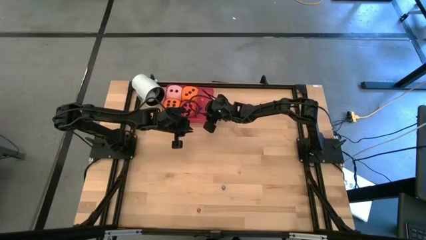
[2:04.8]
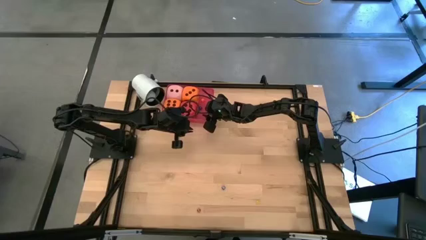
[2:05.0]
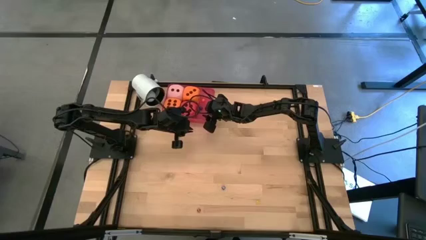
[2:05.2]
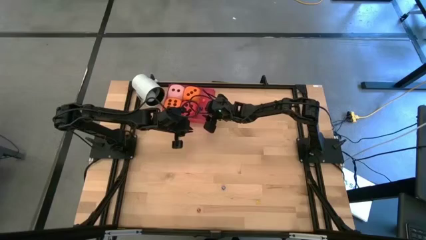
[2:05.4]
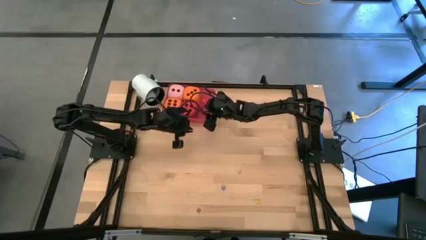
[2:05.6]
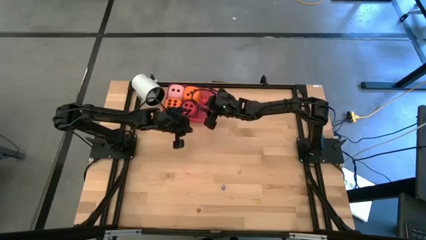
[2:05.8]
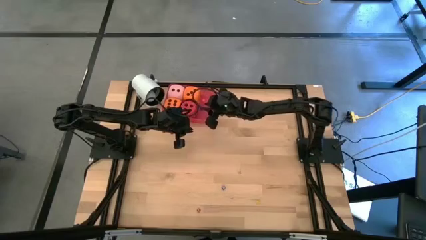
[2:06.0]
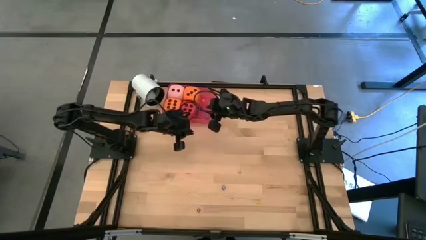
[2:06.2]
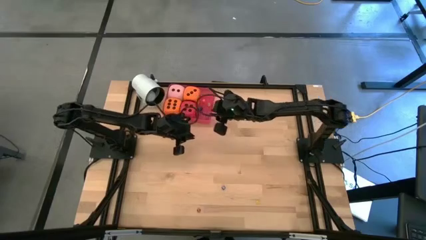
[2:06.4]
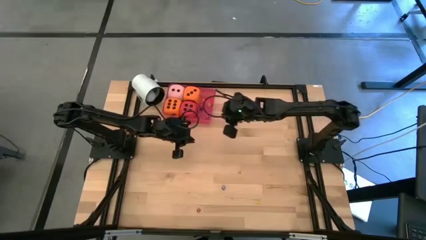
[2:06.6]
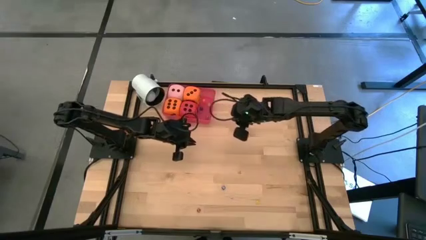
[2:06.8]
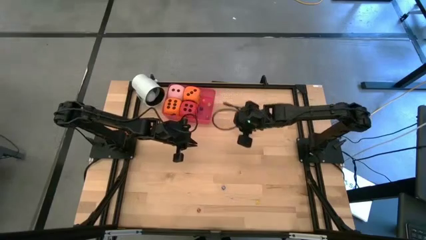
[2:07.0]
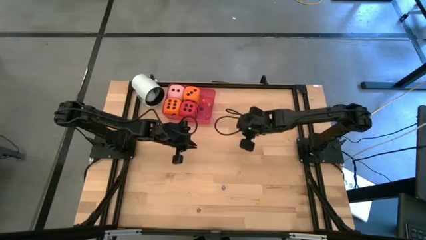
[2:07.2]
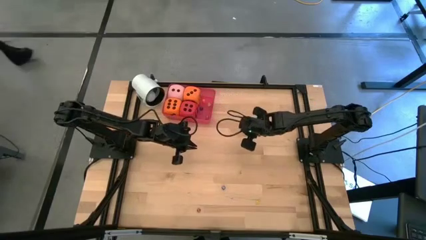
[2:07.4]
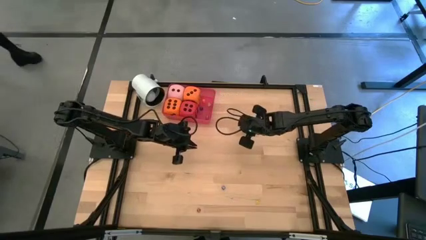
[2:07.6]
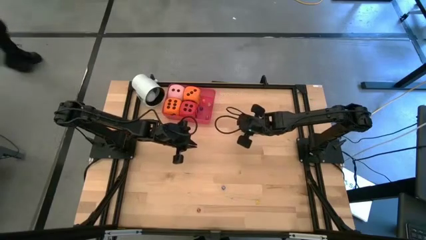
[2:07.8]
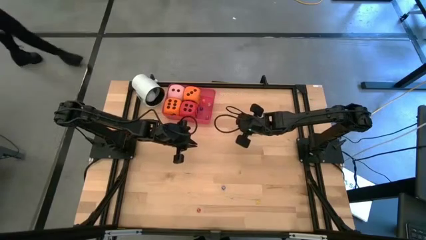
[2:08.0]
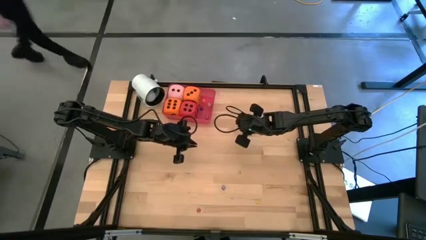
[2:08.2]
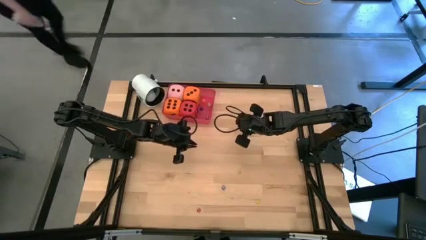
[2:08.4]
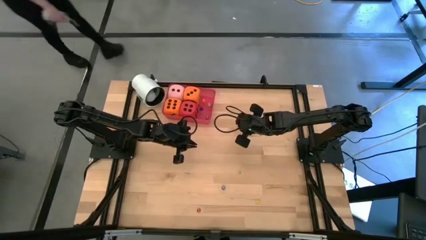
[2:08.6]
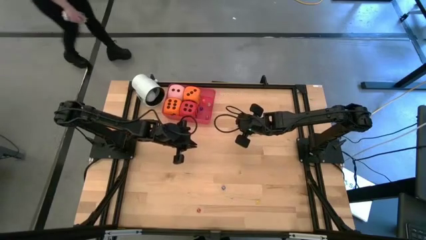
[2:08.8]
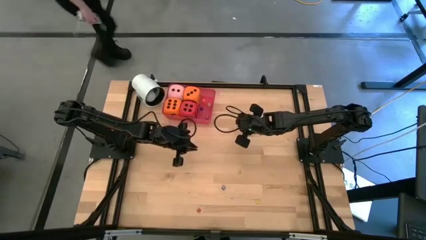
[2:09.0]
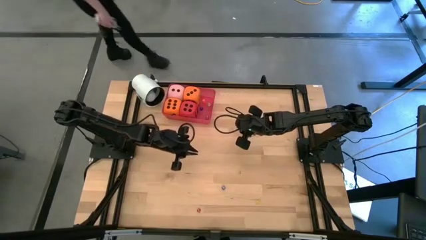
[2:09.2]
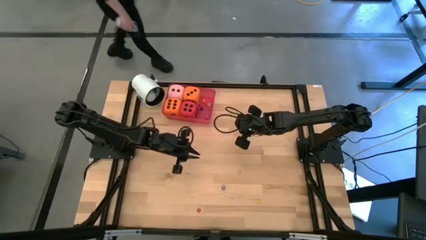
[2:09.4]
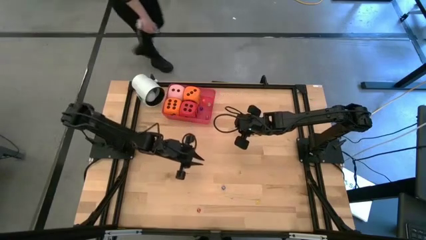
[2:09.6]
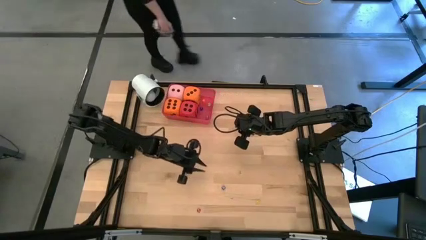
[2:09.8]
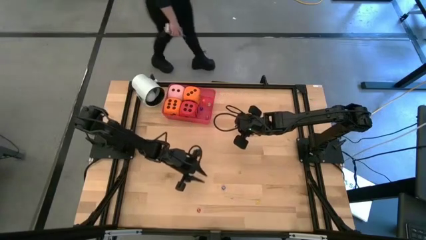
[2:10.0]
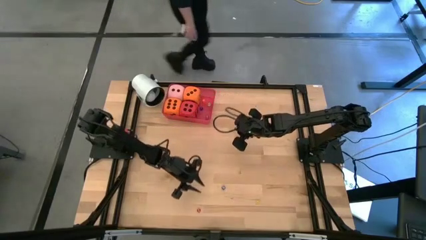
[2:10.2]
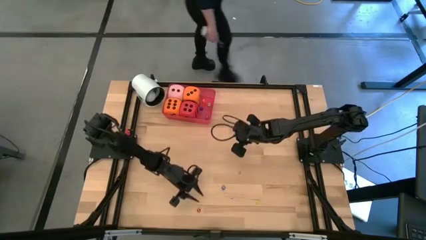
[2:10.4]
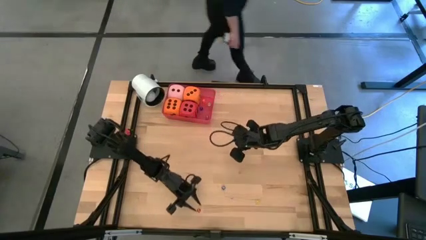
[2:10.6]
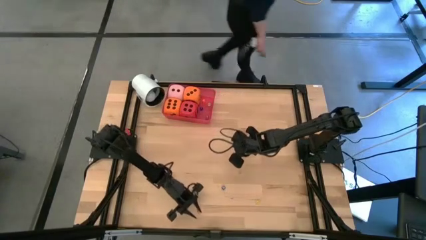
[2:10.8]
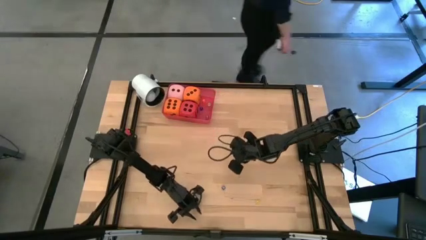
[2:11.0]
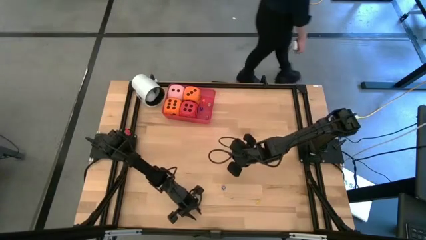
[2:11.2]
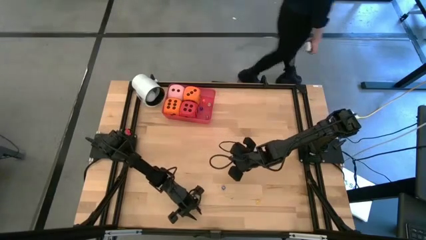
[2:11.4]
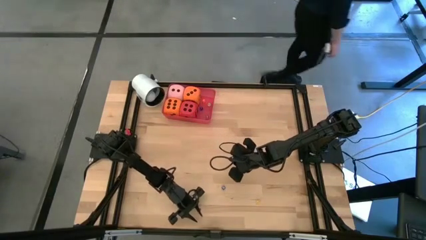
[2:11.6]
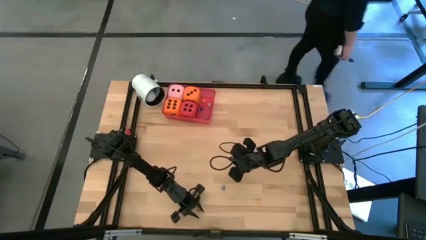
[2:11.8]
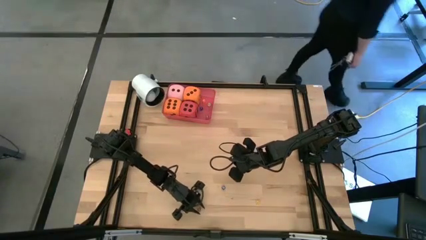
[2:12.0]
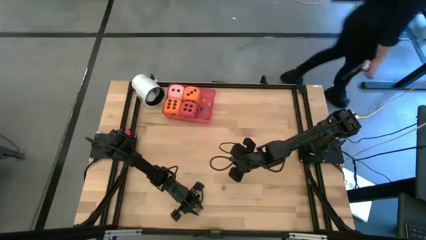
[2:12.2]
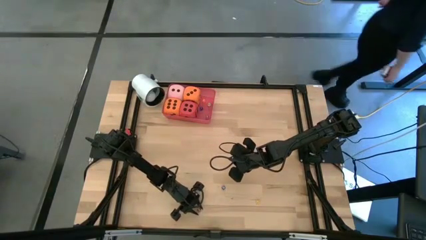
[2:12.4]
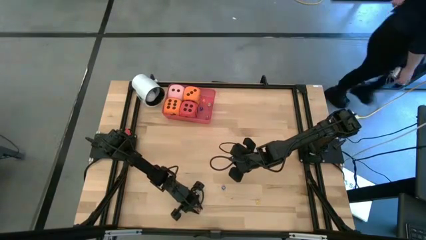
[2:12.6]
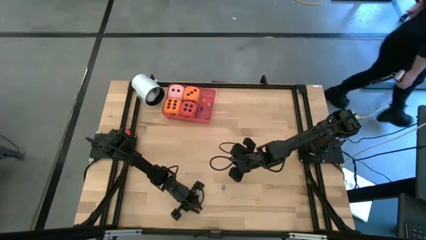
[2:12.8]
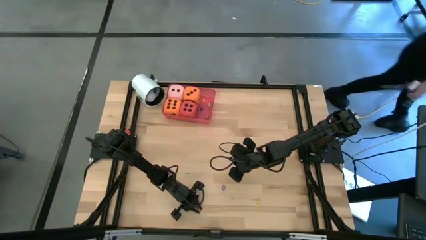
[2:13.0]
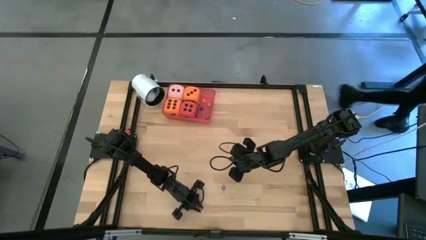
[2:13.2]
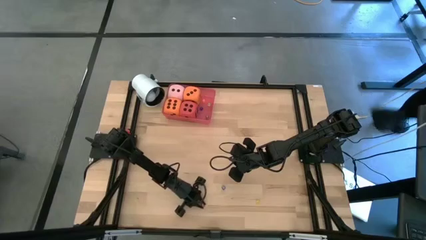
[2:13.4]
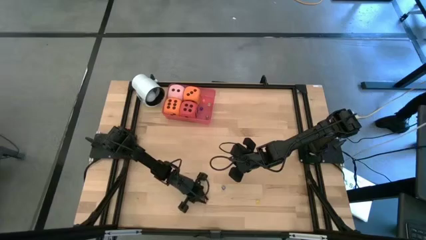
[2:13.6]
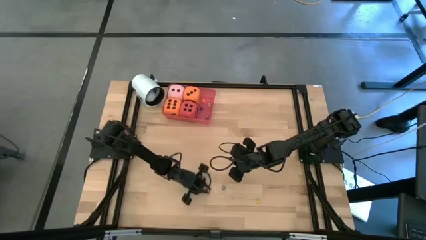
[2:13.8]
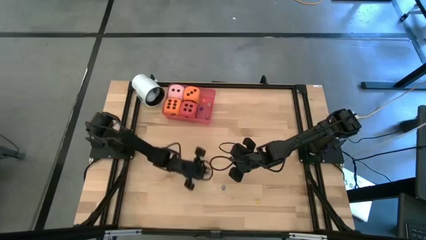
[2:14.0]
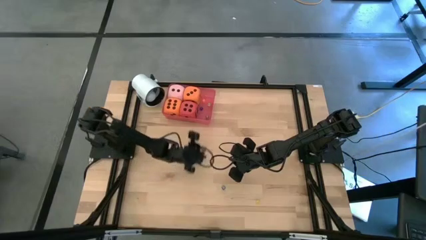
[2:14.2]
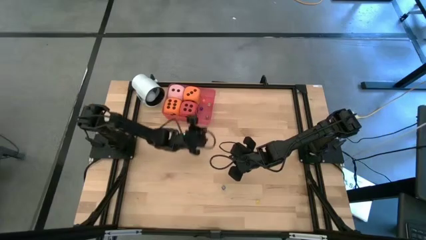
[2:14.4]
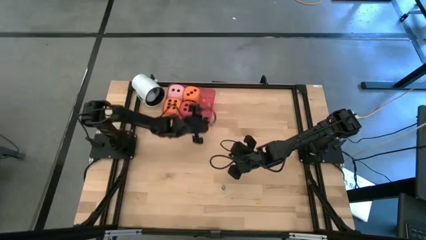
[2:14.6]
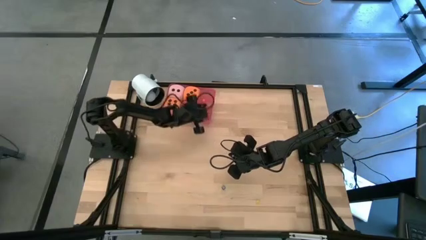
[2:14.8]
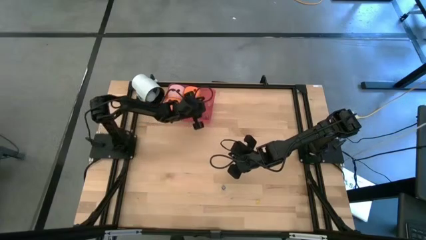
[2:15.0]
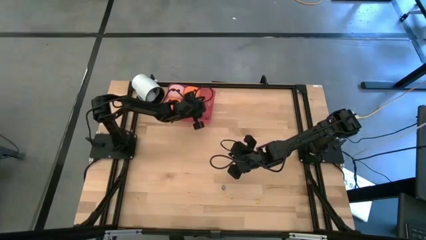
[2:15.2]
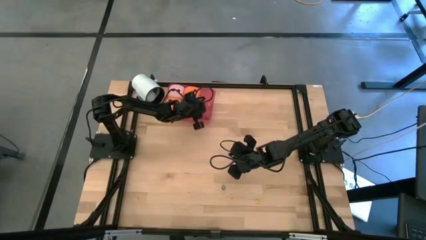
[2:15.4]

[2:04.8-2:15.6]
Task: Pick & Place Dice
Put the small red die into the red bin
